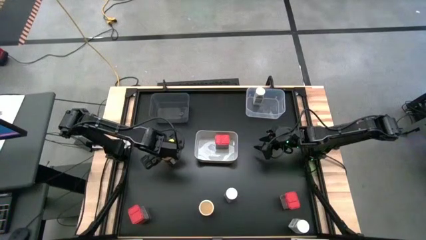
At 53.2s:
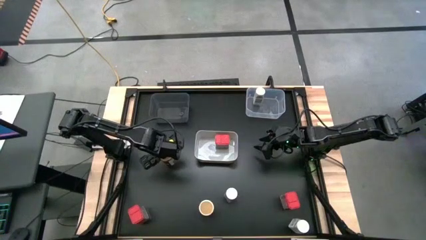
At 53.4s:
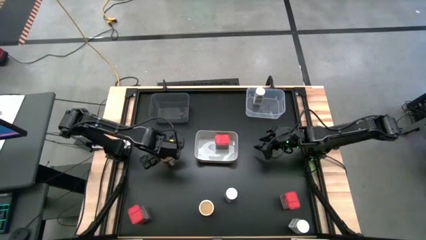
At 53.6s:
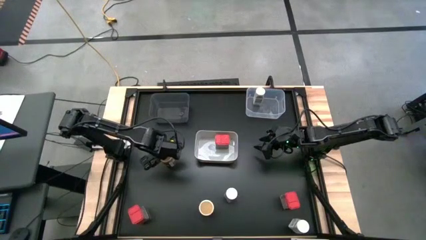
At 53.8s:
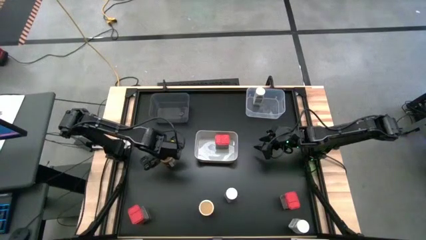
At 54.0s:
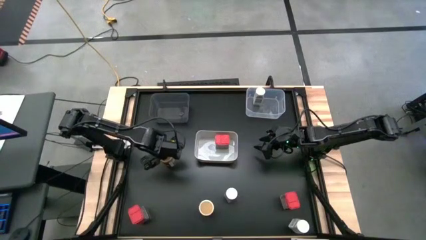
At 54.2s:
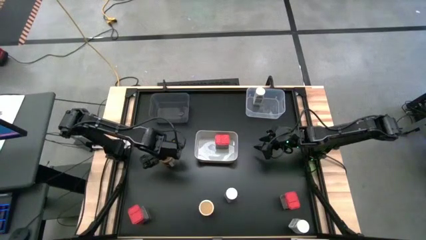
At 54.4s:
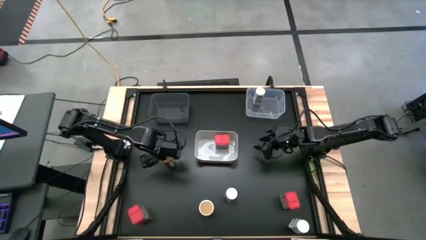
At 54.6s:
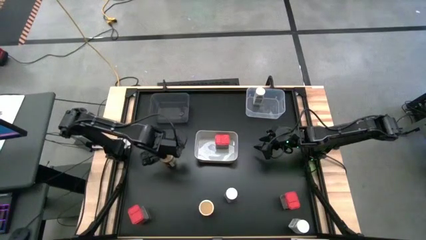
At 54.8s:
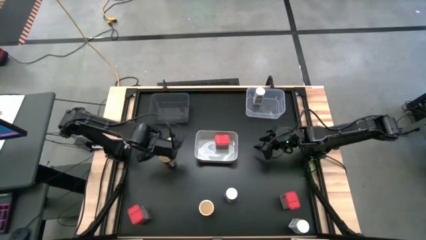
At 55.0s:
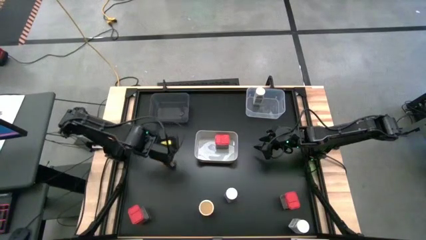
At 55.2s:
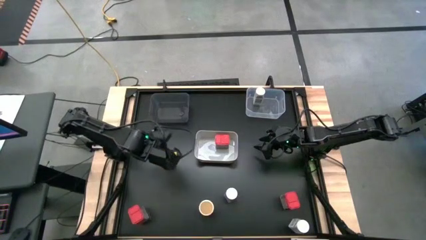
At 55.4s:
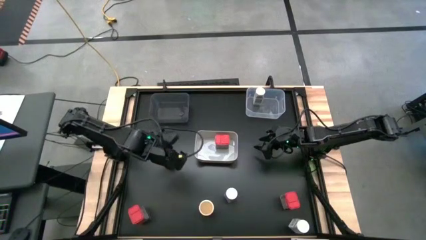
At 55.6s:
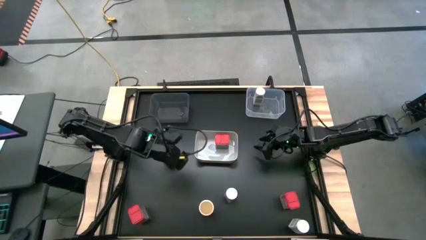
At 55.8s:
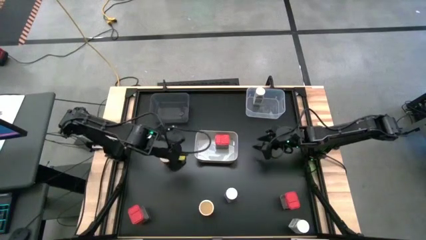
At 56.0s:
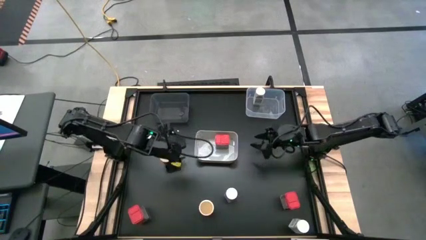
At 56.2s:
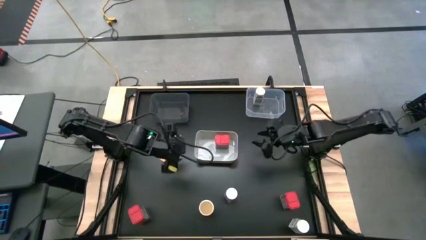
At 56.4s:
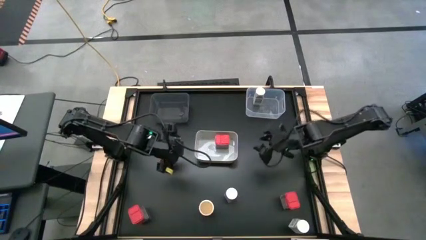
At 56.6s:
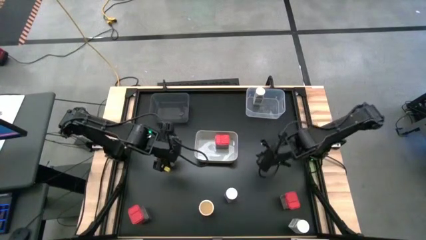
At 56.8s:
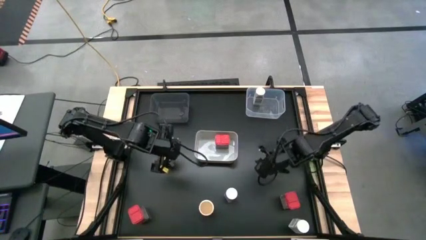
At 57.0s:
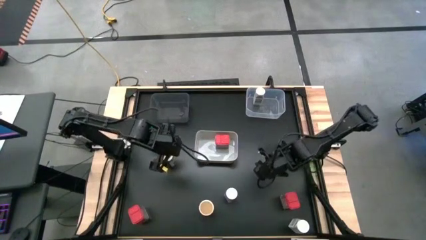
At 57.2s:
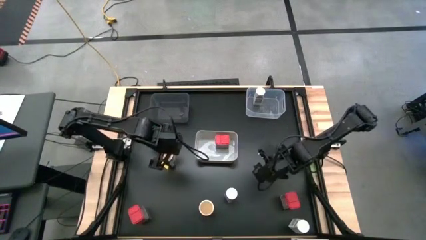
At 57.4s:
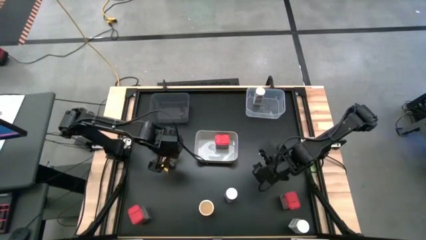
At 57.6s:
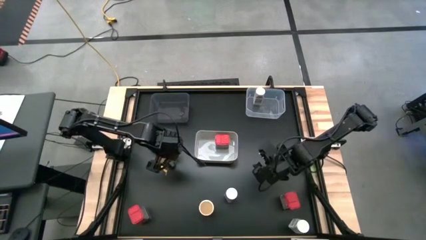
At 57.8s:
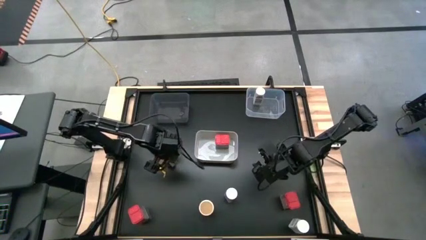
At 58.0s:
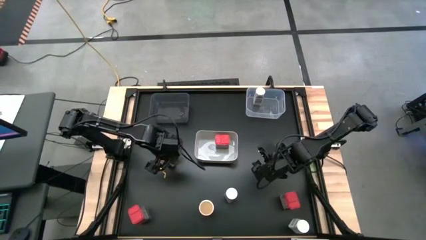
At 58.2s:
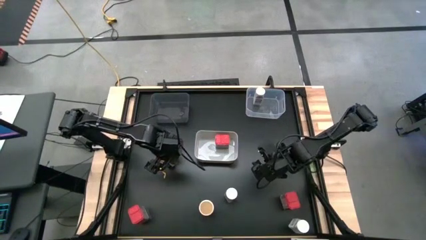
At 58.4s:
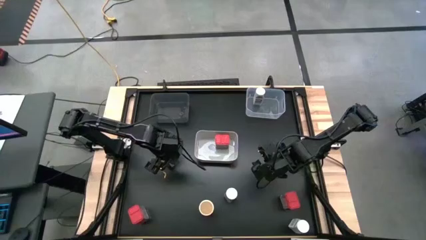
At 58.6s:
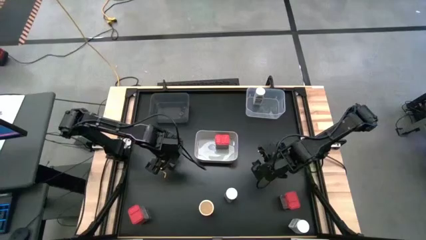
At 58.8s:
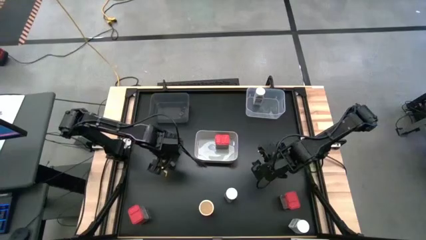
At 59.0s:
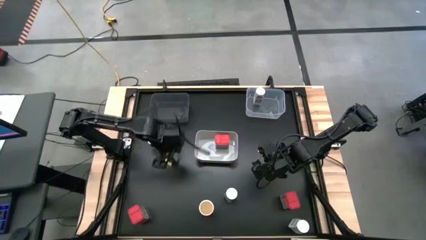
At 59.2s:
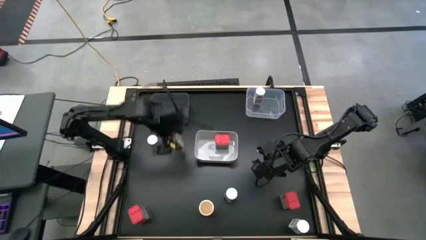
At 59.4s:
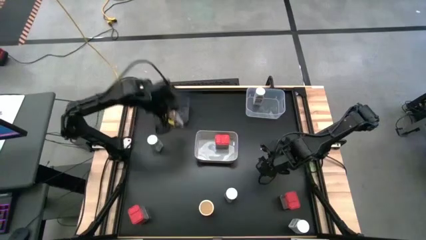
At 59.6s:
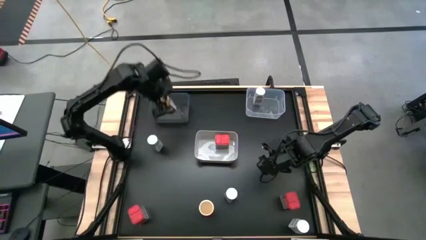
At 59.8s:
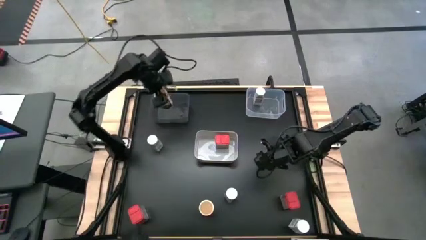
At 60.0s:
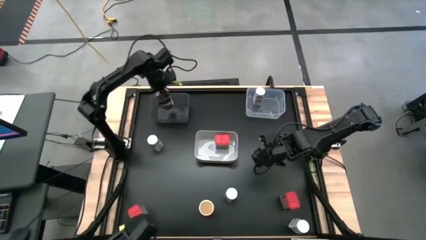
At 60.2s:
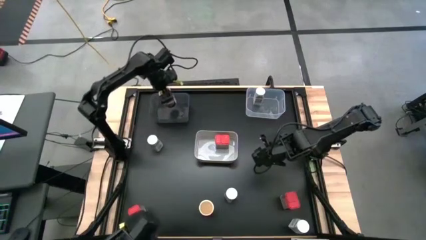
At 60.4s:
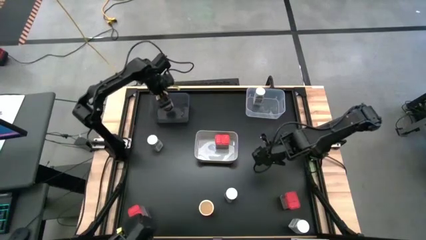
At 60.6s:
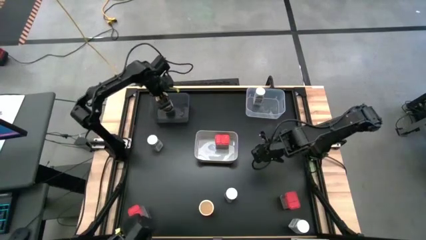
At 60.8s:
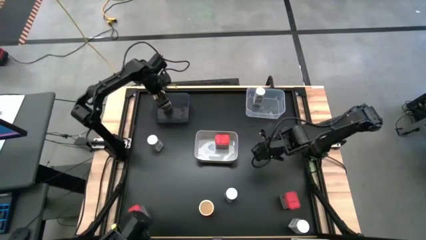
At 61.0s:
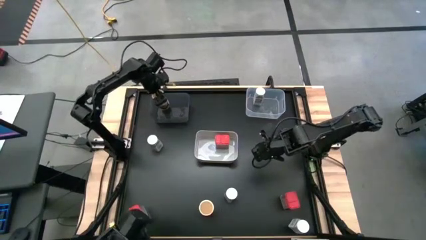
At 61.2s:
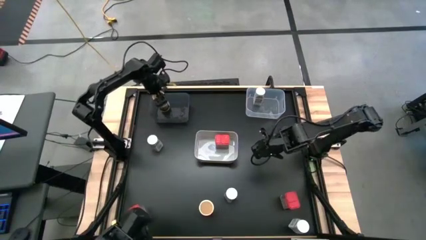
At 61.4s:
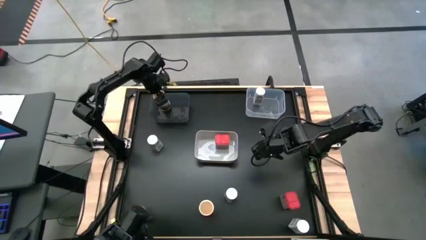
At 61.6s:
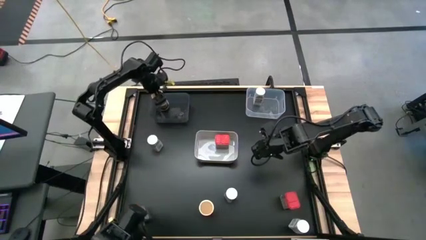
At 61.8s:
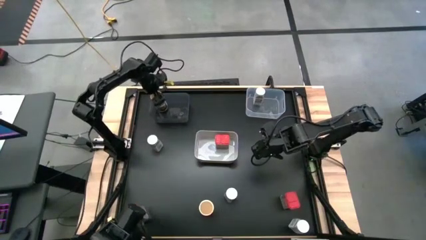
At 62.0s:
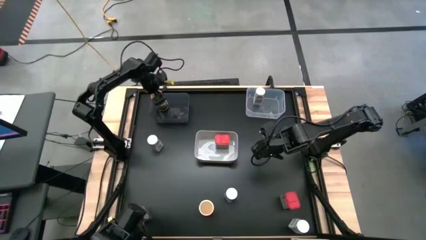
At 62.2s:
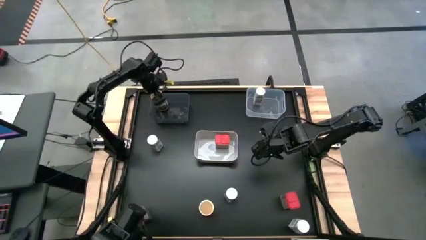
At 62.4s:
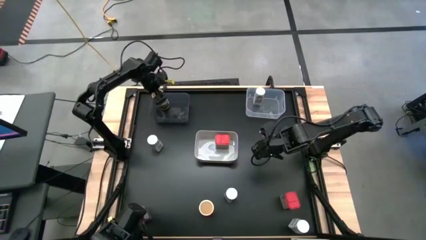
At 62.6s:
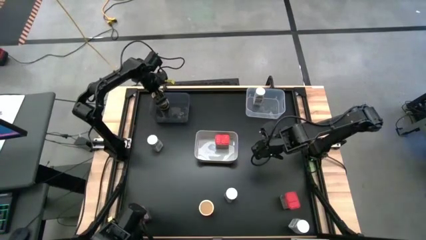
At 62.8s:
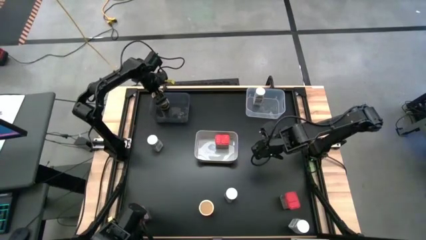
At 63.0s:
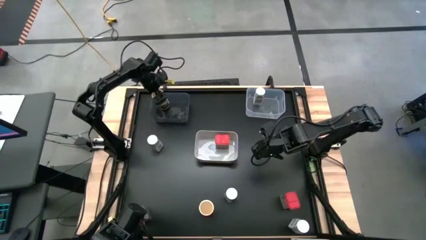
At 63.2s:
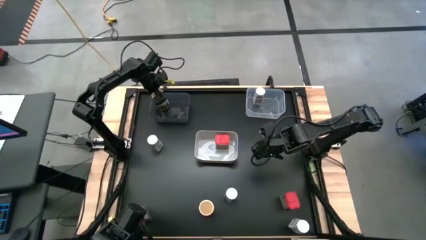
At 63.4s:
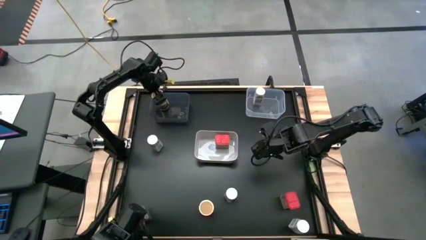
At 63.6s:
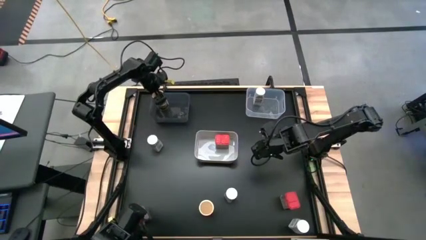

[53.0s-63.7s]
Task: Sort spices by type
Put the golden seasoning bottle into the black bin

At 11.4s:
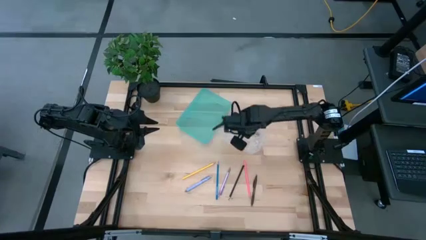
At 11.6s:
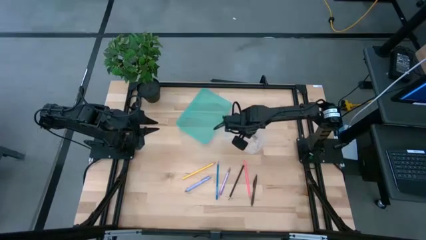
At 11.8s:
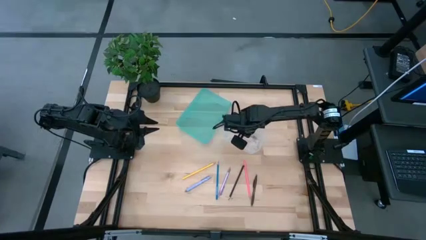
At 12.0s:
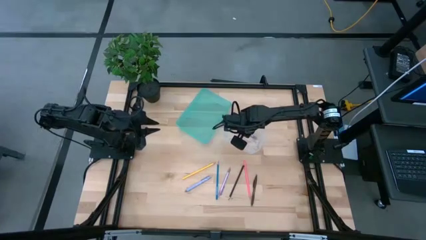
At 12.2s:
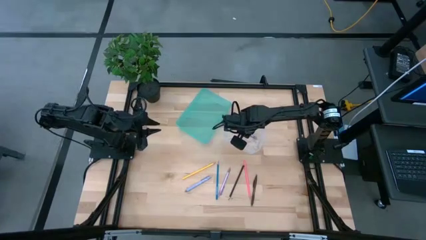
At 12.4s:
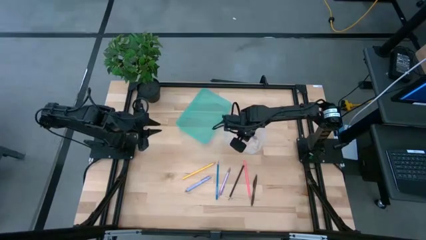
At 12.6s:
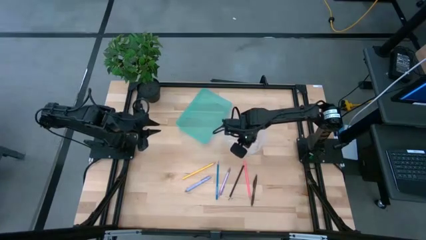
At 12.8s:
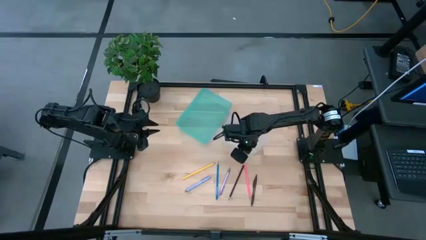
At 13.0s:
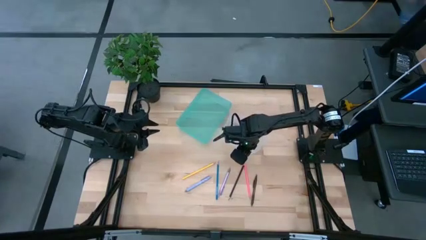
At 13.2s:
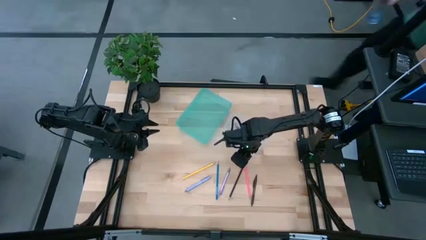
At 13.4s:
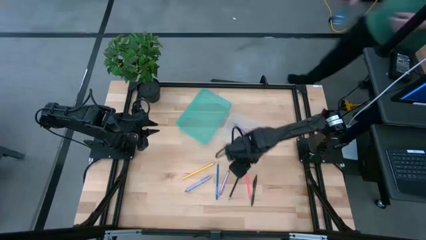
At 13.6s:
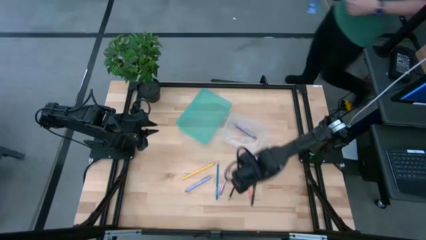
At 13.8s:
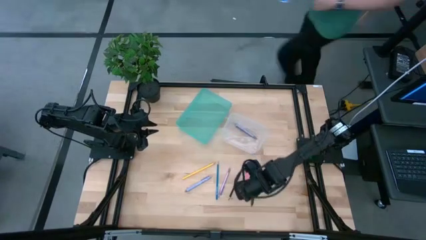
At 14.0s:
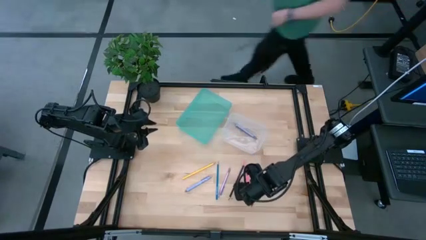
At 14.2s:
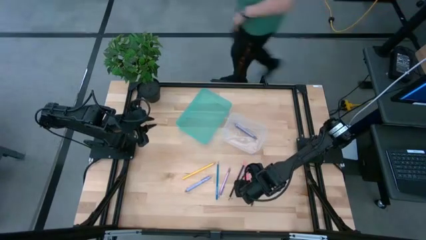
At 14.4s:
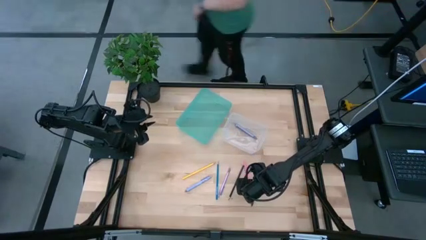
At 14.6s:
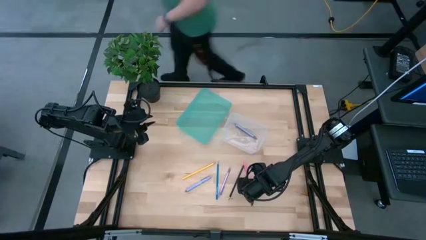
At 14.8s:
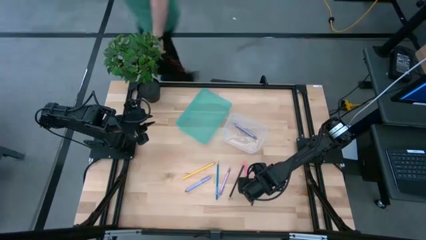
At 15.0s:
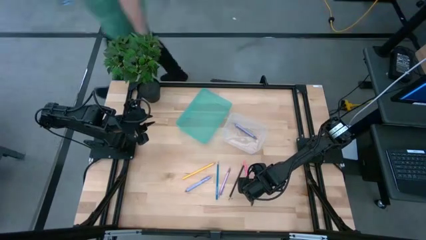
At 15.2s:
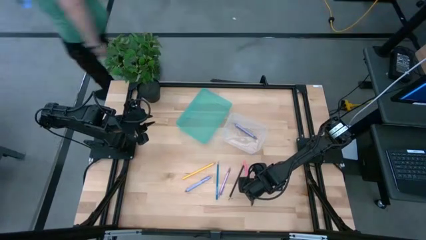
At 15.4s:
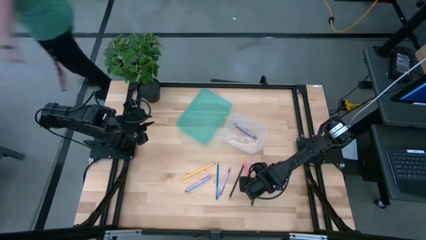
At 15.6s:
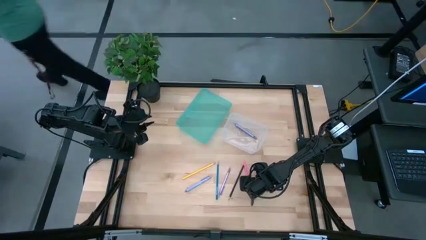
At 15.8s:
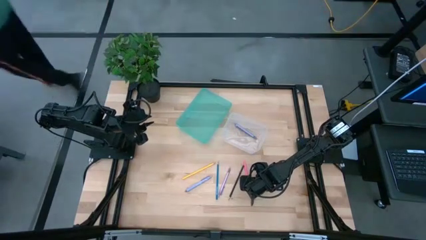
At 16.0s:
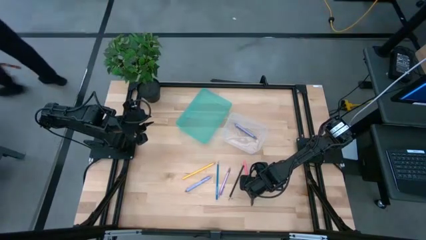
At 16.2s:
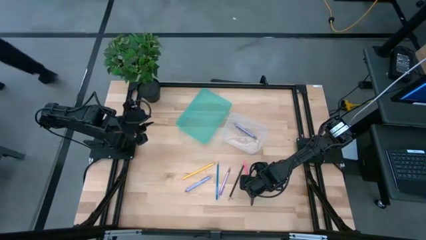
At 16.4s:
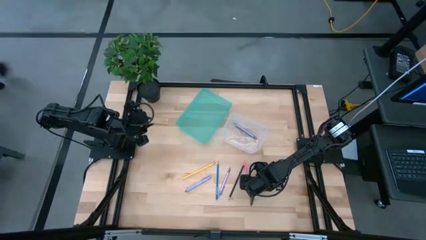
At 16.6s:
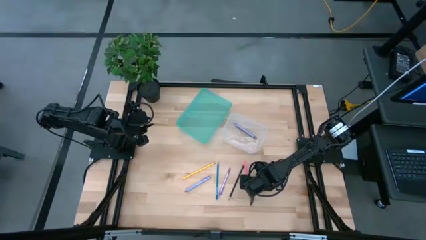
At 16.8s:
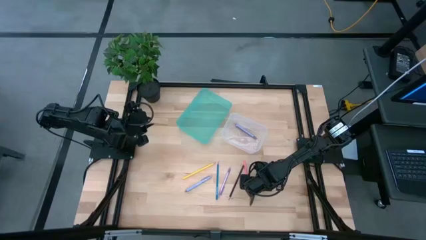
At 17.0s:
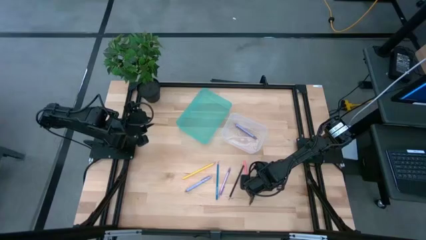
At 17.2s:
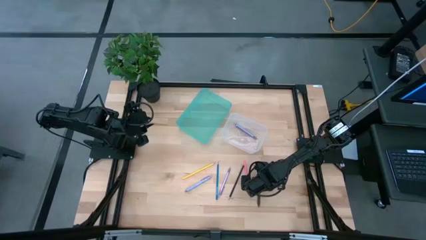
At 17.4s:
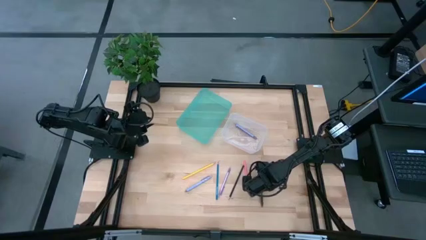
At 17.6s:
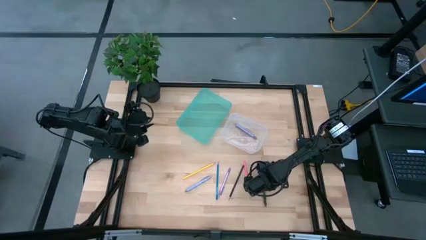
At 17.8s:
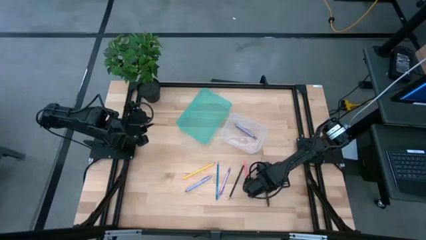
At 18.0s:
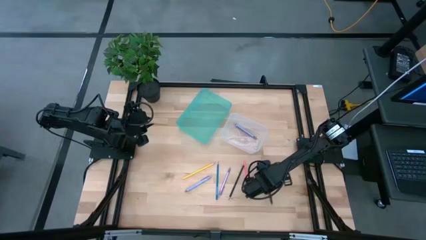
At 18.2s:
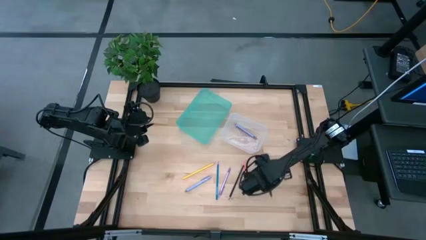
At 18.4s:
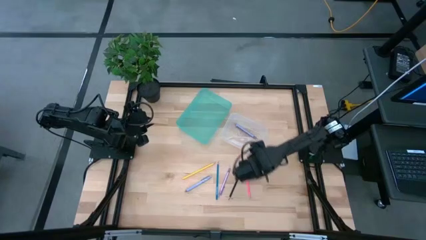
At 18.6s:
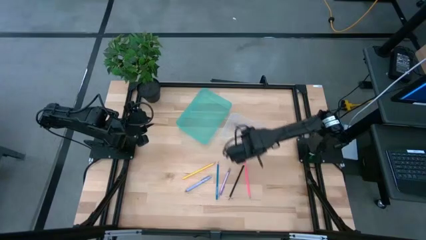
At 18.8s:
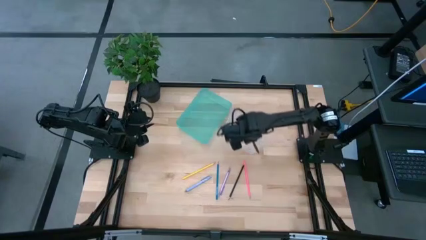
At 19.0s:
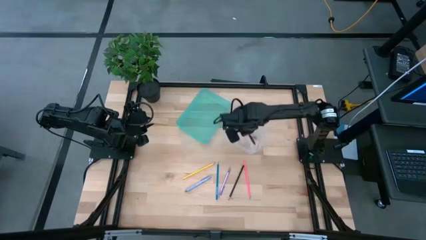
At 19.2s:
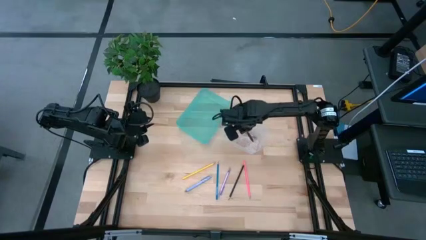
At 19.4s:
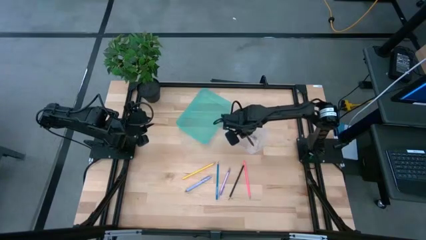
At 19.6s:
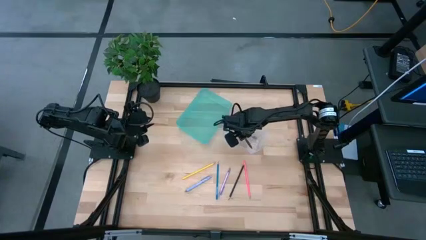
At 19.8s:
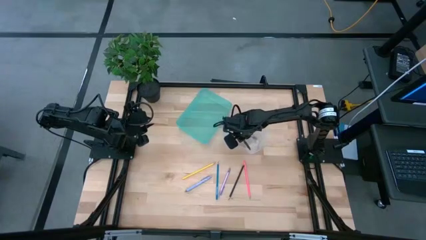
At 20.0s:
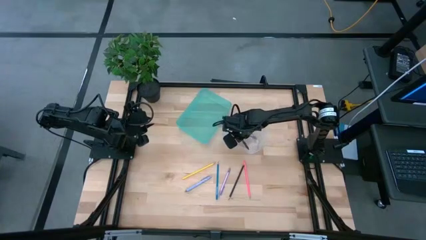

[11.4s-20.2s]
Task: Sort pens & pencils
Put the brown pen into the transparent bin
